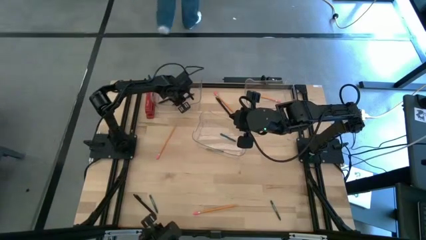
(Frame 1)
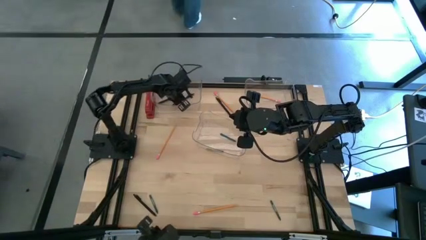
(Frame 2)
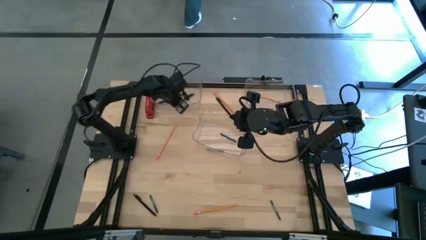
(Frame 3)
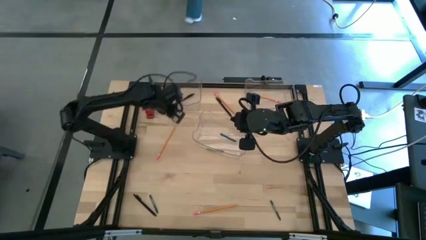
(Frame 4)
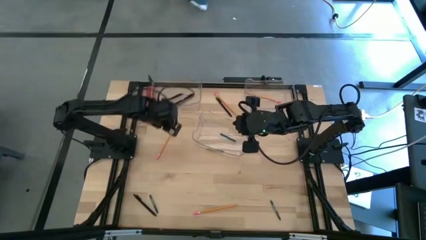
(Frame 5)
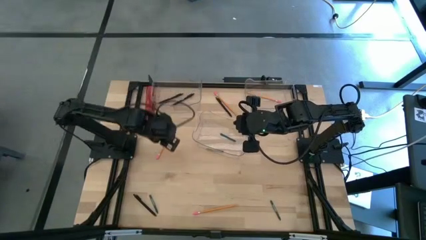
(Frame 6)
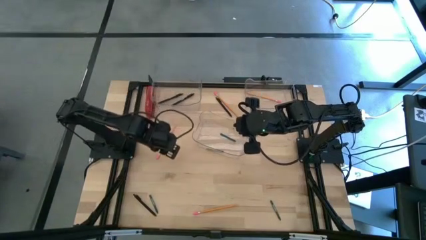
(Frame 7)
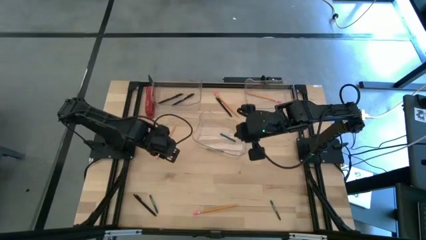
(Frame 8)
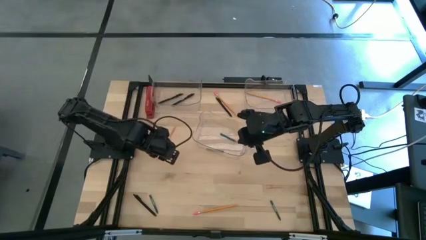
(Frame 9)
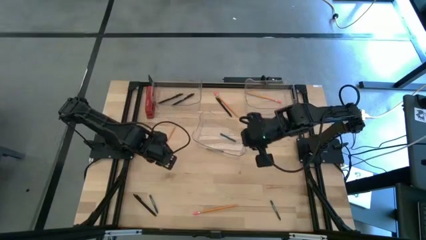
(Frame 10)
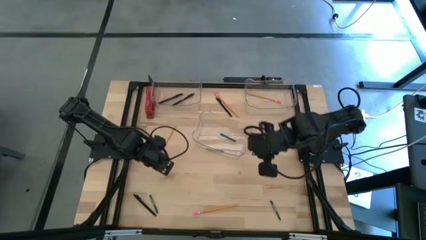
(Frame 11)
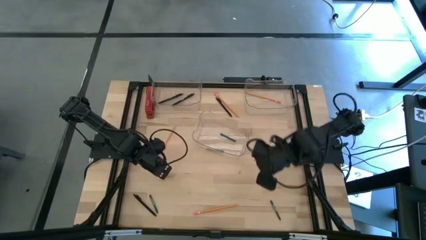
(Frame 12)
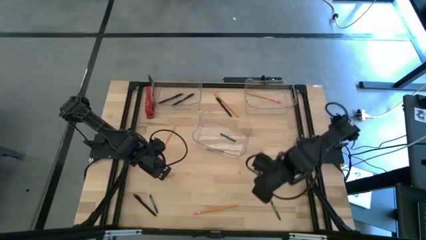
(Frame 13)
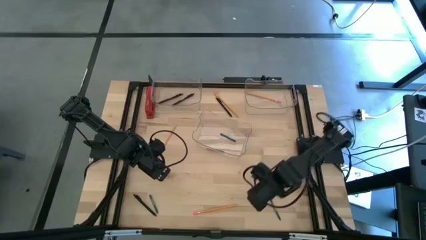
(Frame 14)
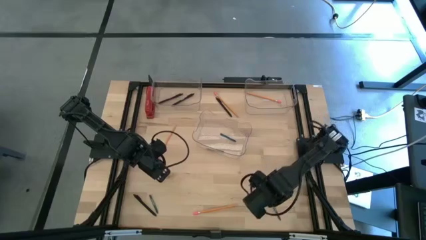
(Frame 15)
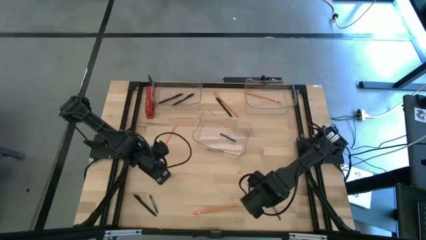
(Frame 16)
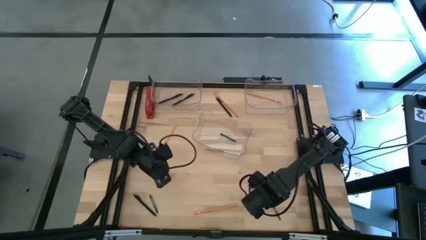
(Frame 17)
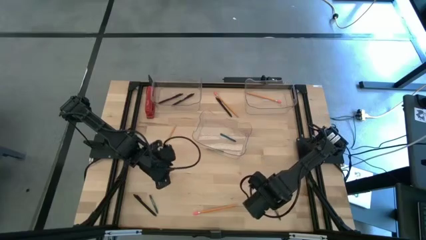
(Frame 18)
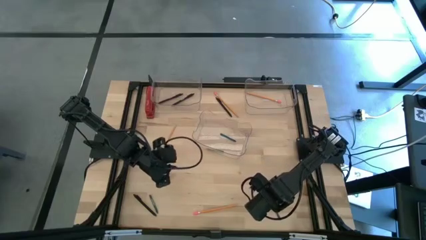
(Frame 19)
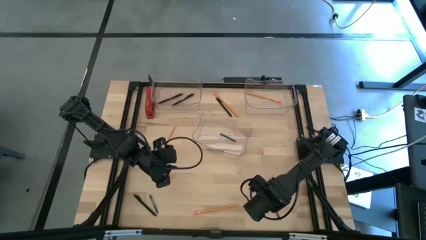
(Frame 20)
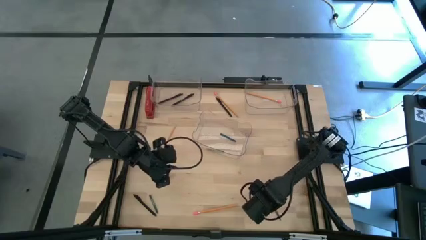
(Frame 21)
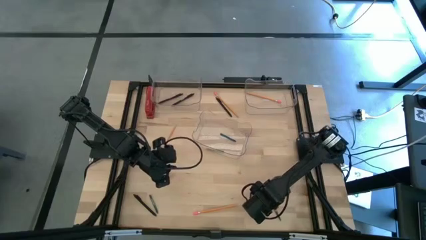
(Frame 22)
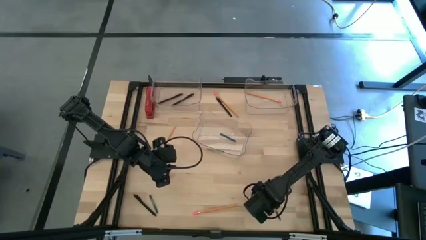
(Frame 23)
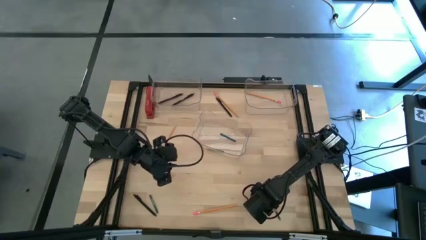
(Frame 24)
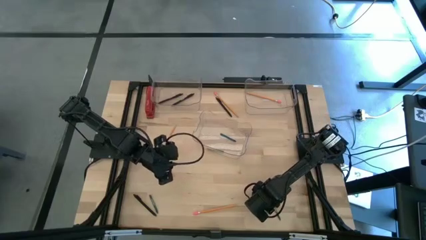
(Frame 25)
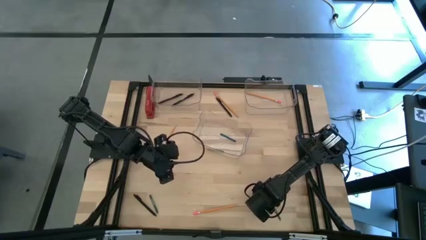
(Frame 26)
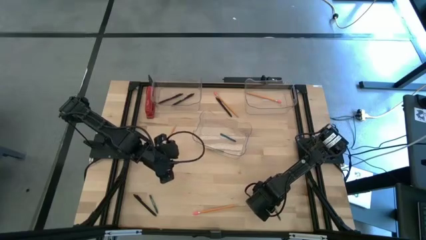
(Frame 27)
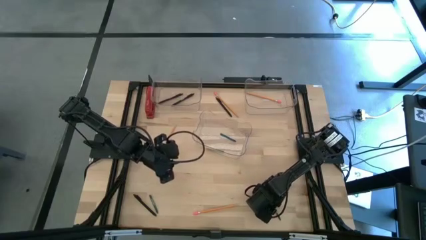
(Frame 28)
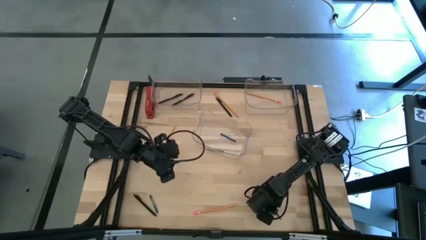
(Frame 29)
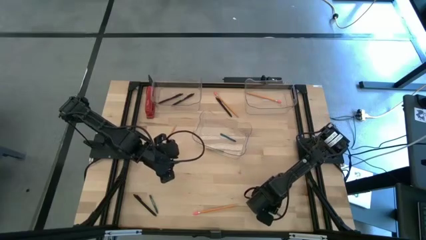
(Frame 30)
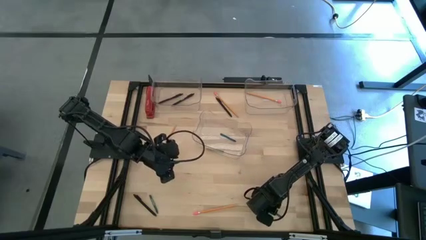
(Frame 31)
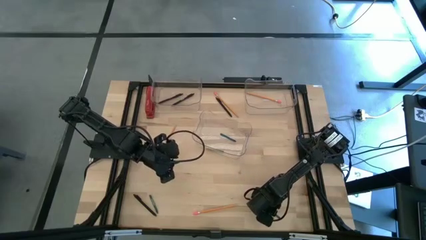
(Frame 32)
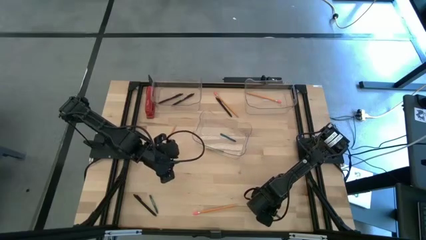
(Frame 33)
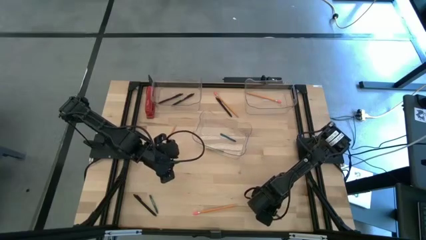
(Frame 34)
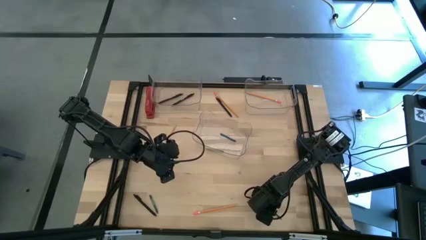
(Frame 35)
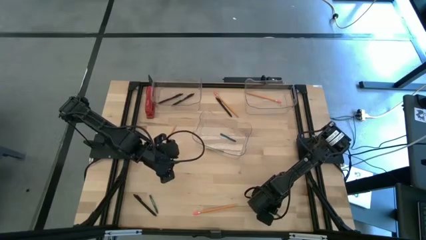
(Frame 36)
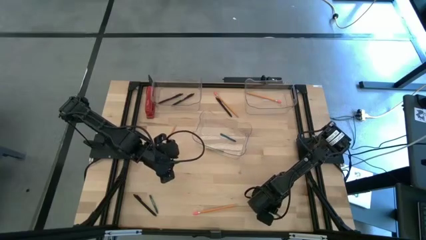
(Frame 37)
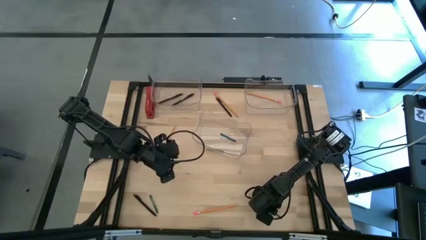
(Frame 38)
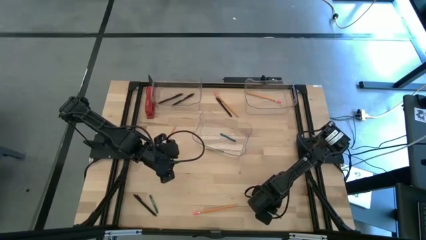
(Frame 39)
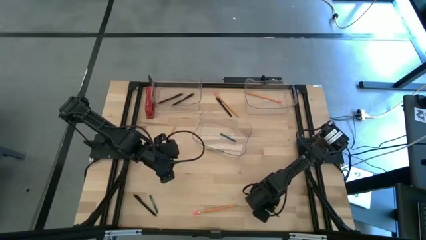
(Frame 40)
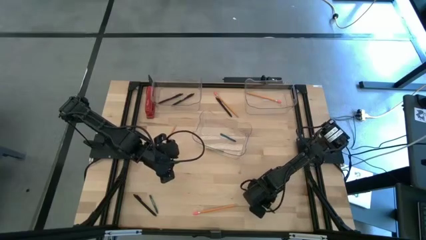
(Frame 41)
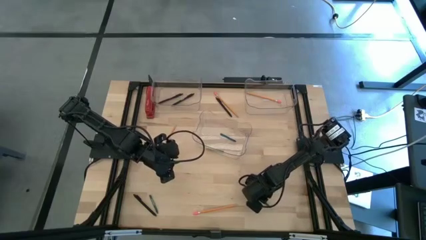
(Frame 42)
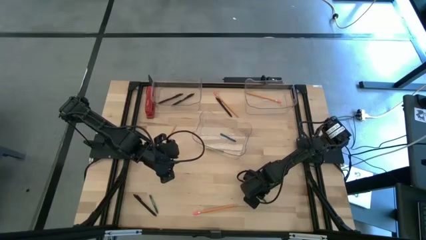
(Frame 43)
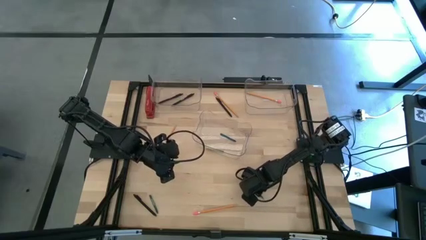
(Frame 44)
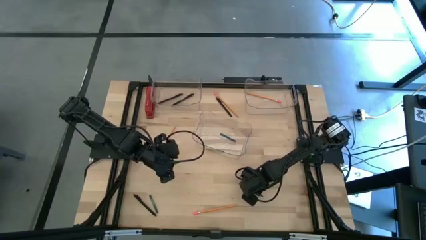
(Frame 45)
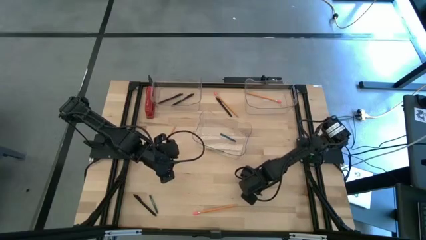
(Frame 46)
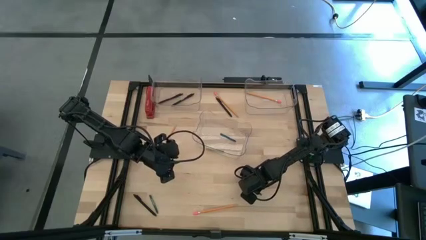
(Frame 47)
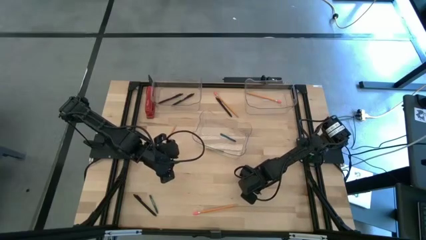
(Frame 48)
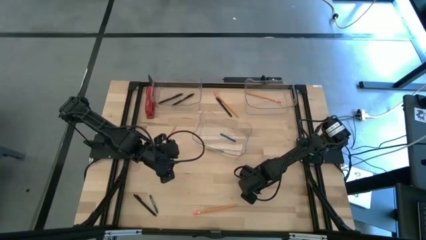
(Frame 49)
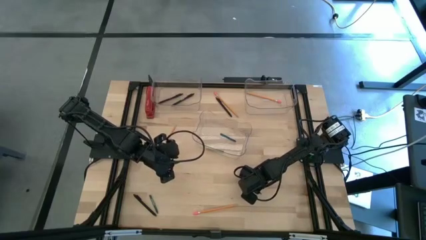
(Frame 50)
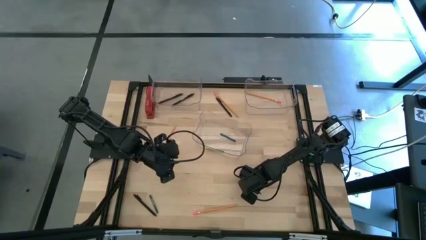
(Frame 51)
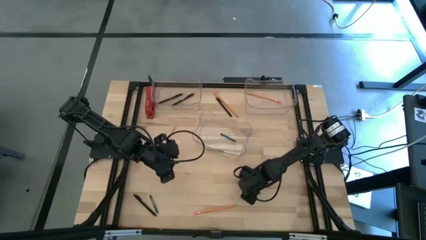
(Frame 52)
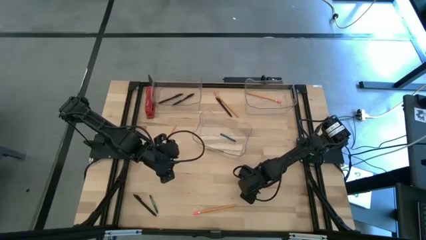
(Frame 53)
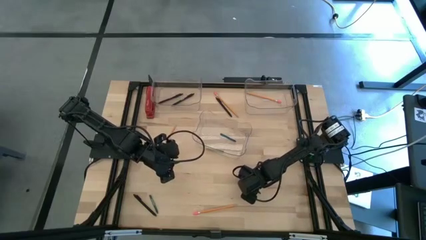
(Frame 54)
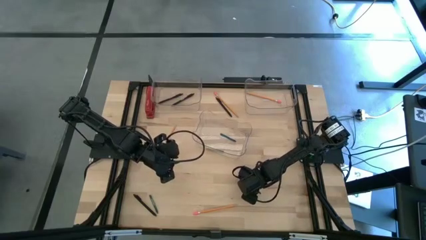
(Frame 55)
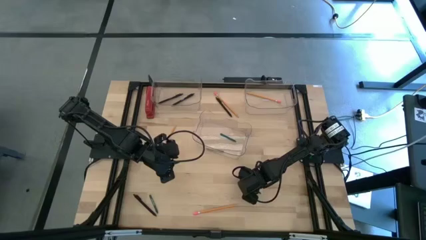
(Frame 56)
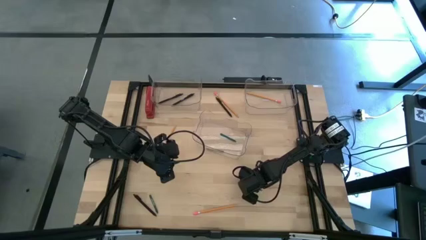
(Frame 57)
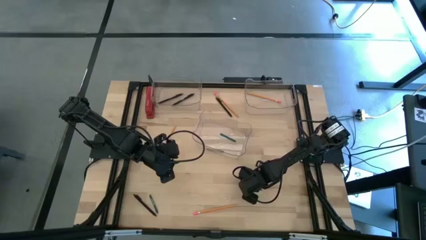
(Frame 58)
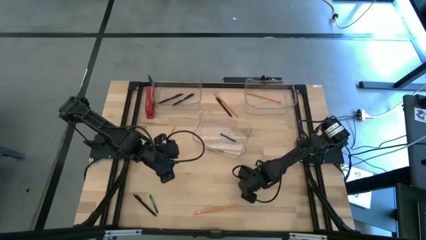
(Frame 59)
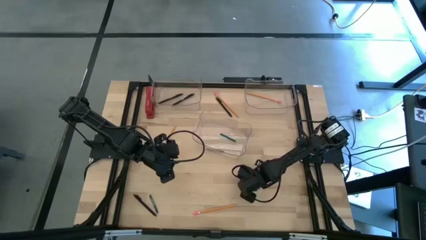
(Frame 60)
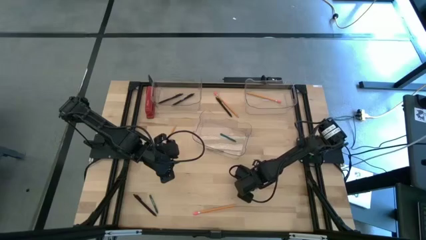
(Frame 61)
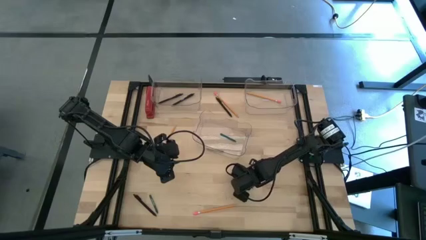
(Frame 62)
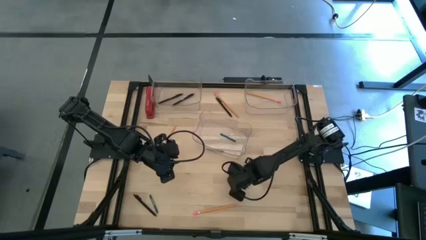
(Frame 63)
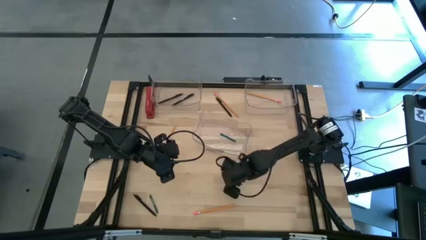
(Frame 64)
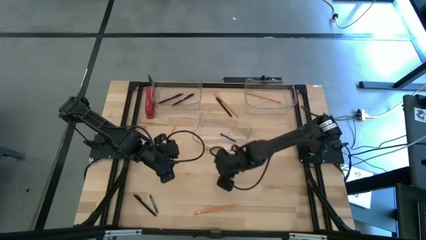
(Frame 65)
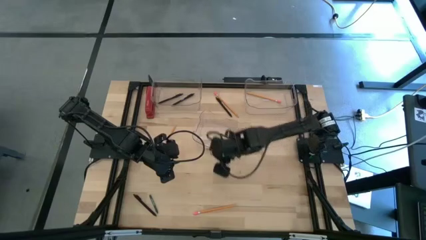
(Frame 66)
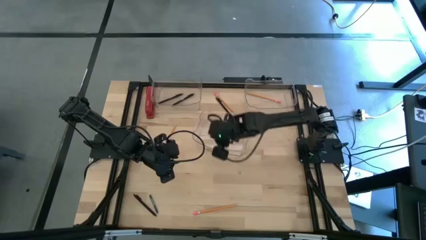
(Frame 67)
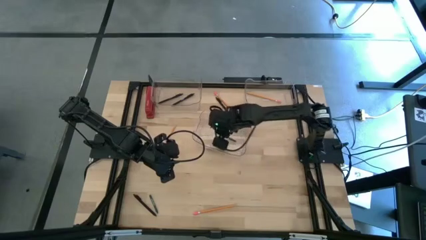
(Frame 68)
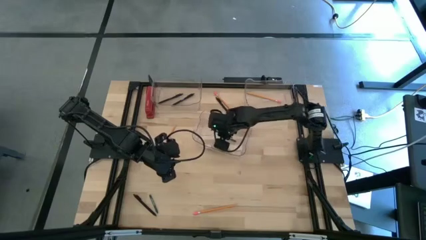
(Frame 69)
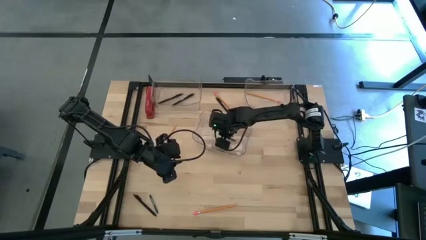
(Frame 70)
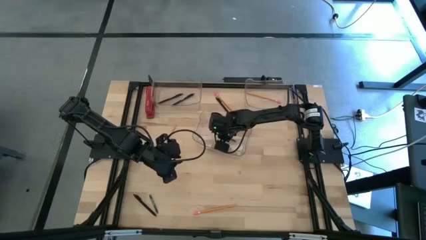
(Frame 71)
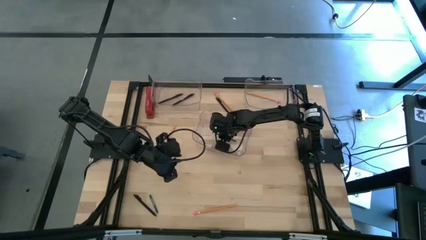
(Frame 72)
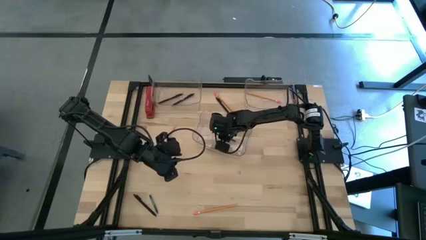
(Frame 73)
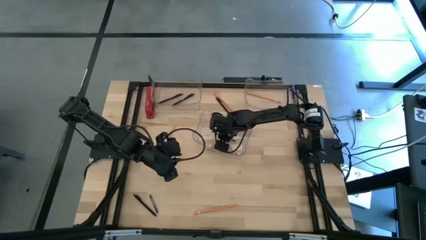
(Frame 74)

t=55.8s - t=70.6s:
Task: Sort crayons/erasers/pens/pencils in bins
Put the green crayon into the middle transparent bin

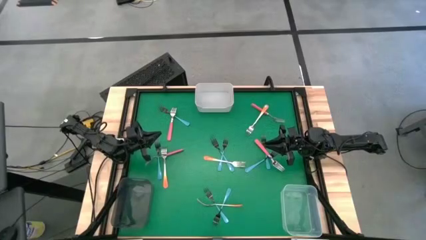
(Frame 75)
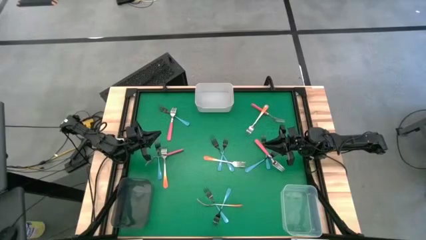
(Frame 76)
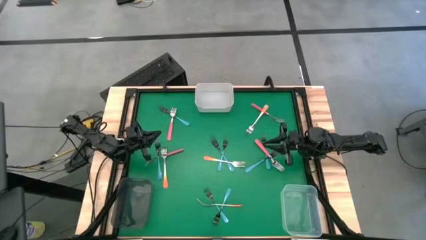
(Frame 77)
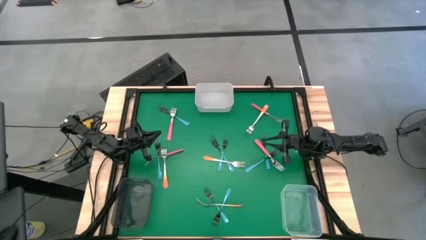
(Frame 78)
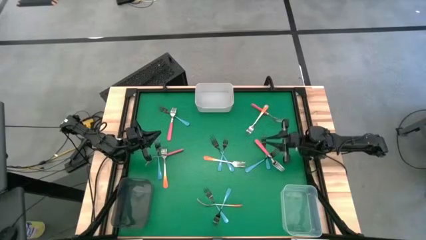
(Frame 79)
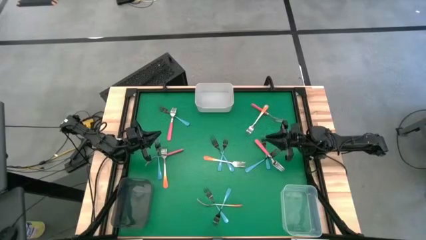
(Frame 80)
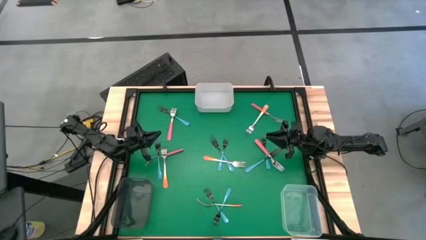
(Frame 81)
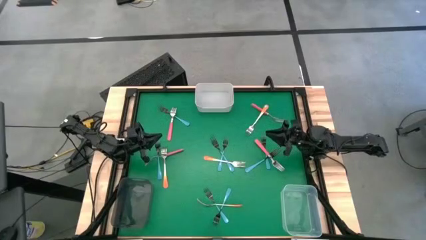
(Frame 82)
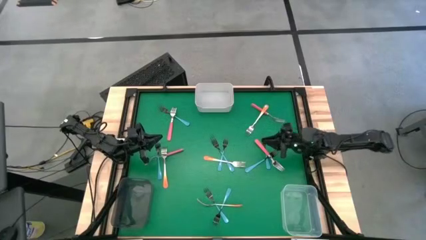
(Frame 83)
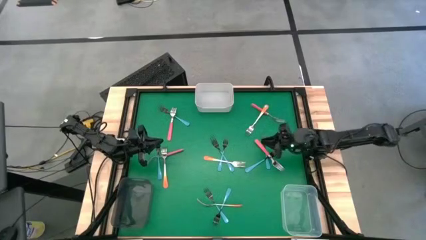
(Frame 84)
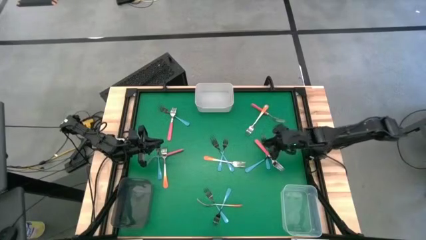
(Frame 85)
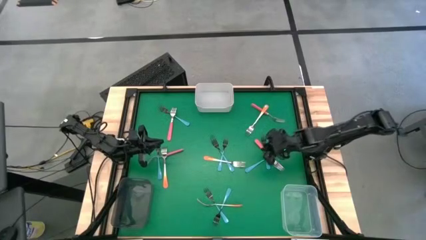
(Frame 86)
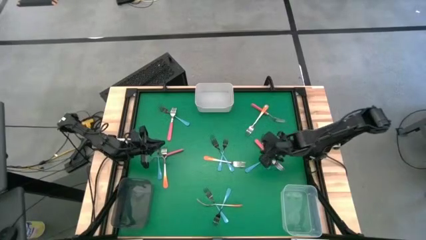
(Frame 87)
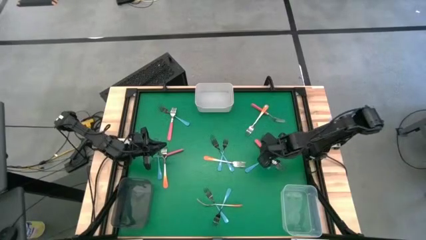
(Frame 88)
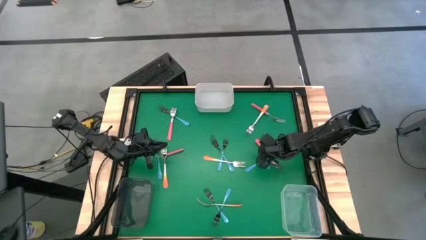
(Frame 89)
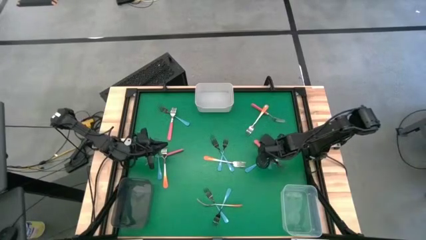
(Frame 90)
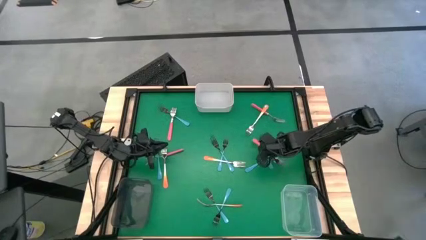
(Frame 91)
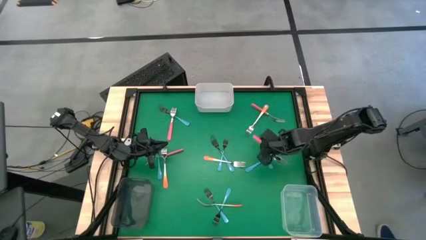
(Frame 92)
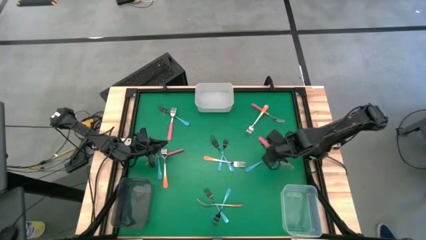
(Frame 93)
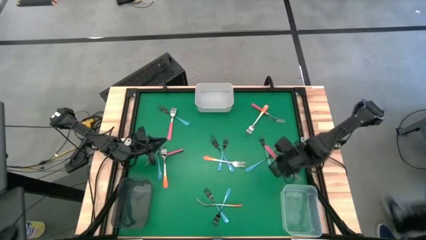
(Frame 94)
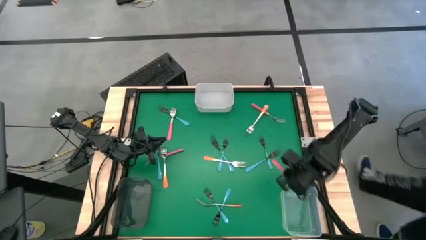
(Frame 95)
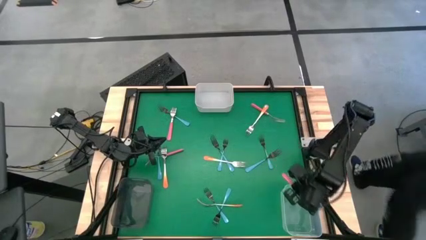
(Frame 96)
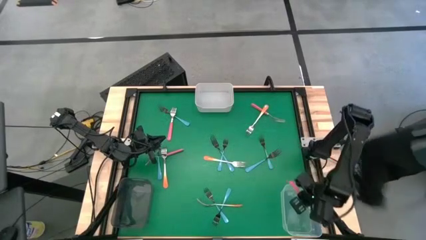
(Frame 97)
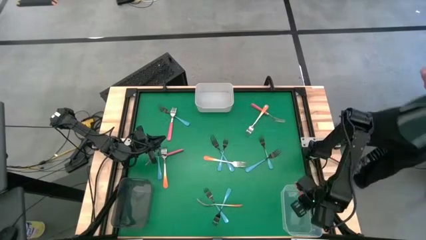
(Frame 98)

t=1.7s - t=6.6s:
Task: Sort silverware by color (type)
Put the pink fork into the transparent bin
